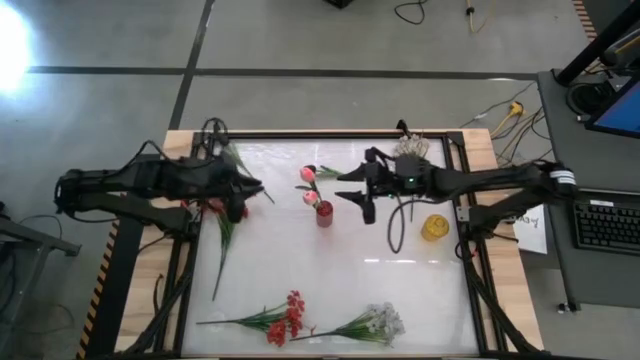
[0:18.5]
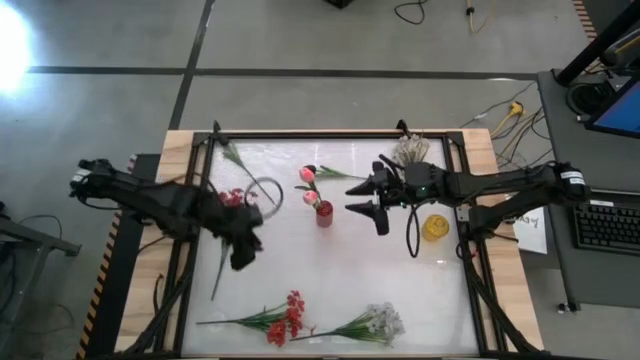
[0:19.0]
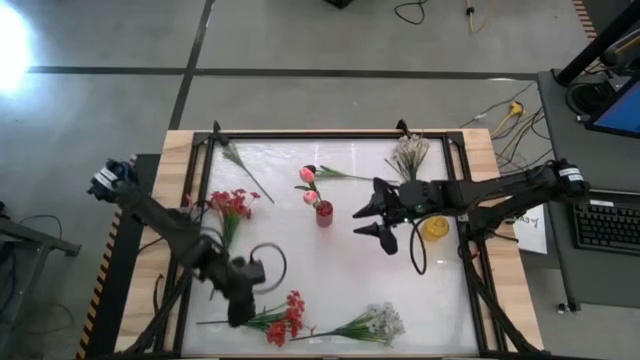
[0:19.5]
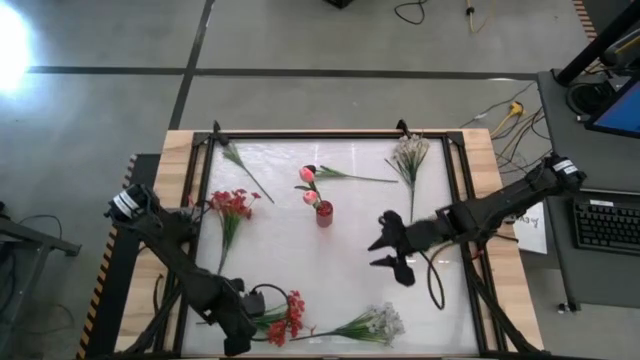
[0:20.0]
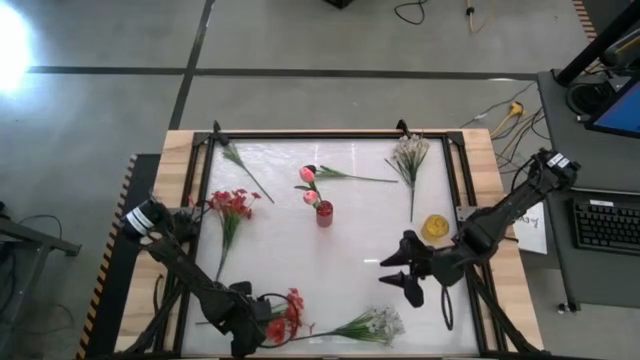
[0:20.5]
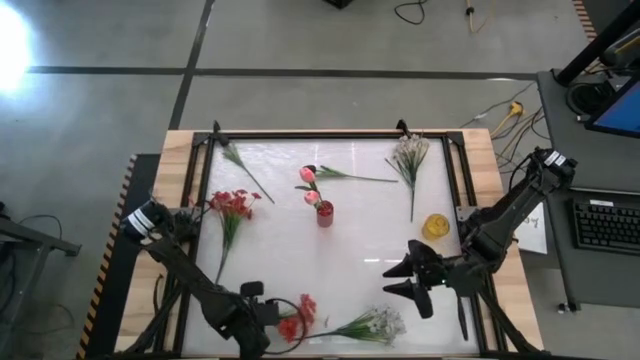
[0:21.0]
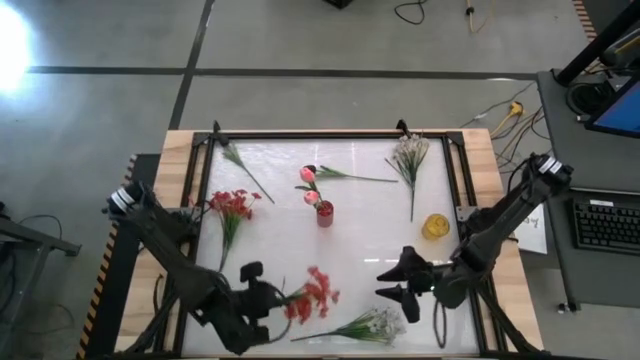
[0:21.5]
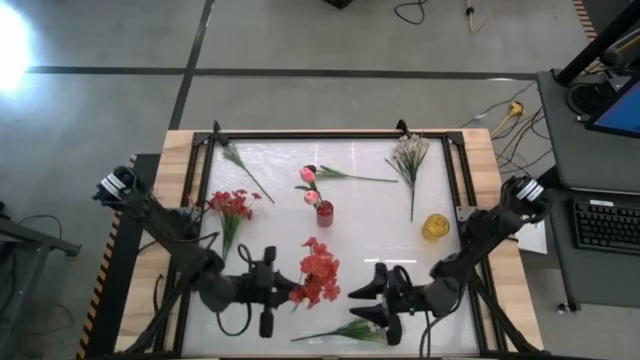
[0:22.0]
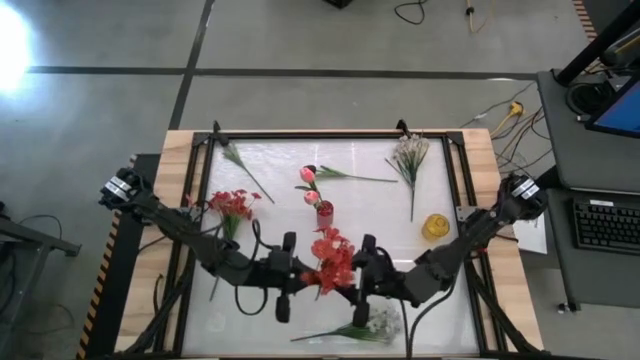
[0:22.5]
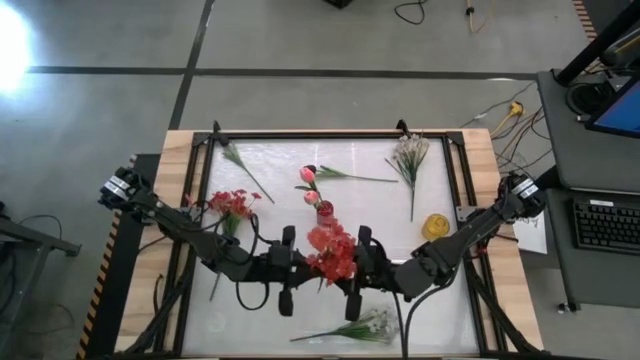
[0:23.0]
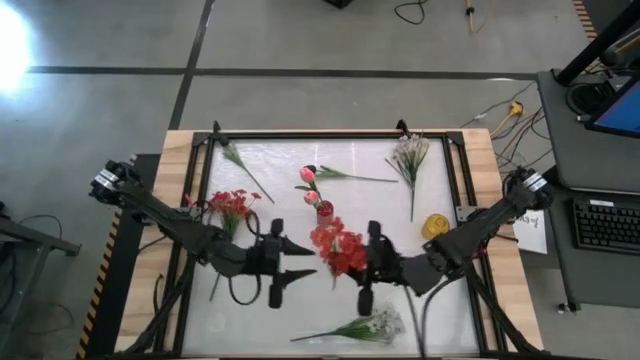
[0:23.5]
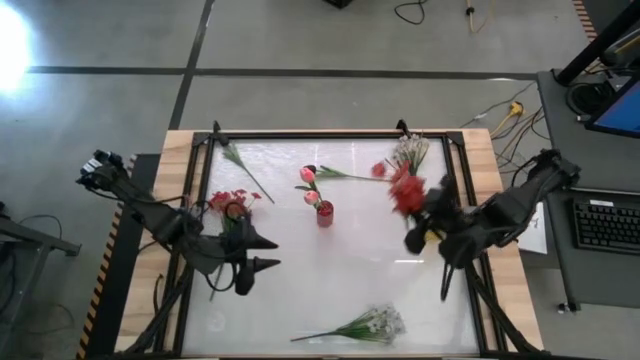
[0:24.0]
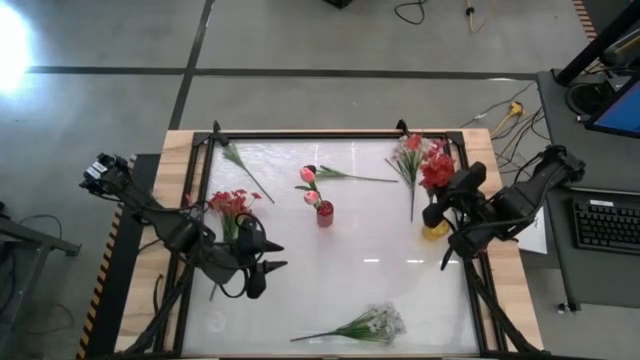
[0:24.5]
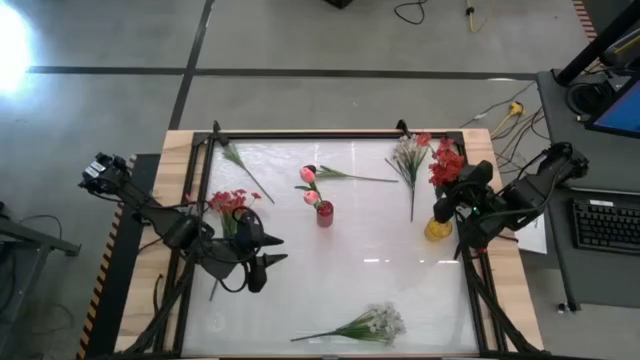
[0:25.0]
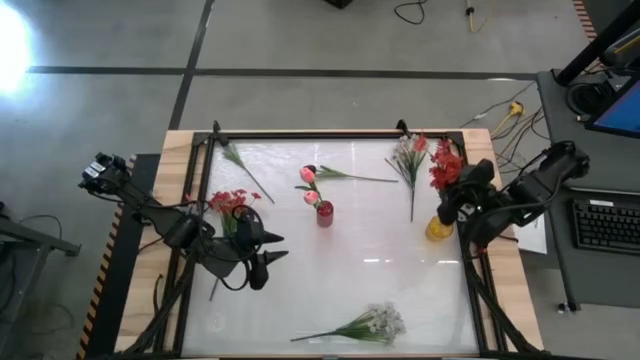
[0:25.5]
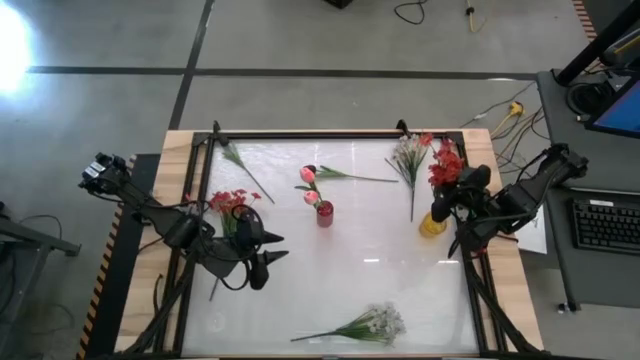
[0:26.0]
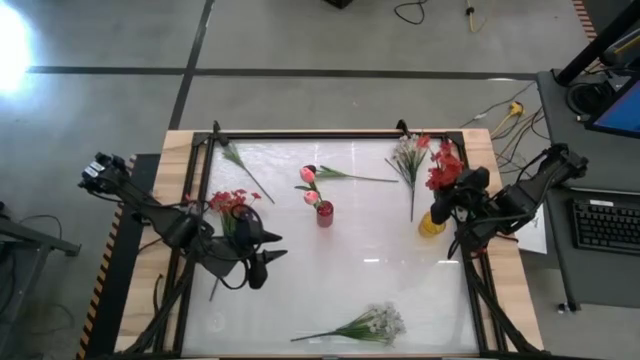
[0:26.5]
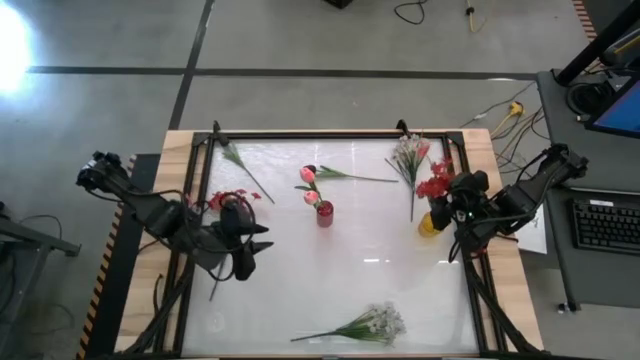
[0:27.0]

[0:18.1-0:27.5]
Task: Sort flowers into vase by color
Put the bottom red flowers into the yellow vase

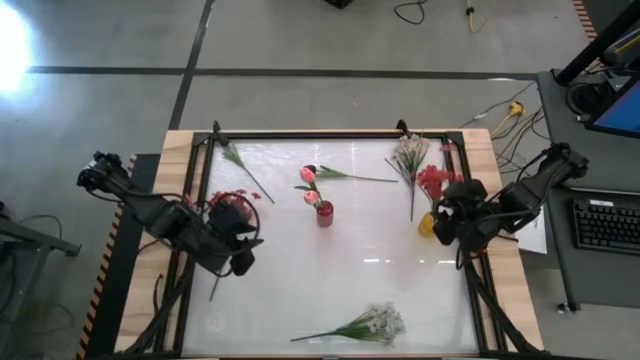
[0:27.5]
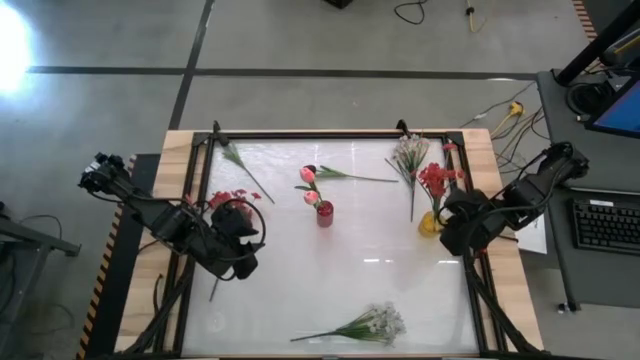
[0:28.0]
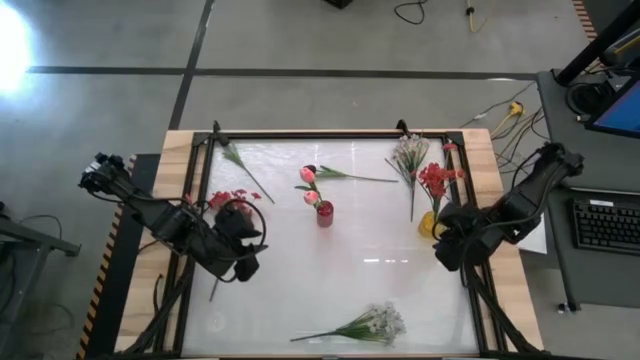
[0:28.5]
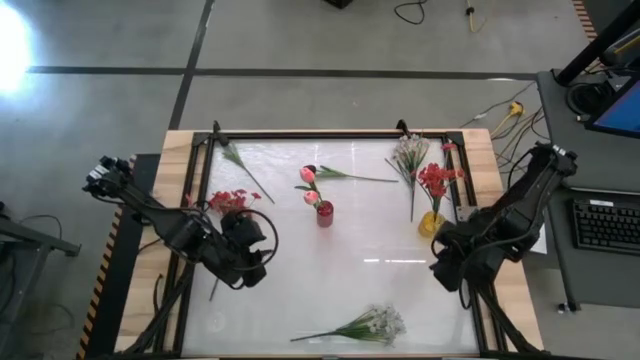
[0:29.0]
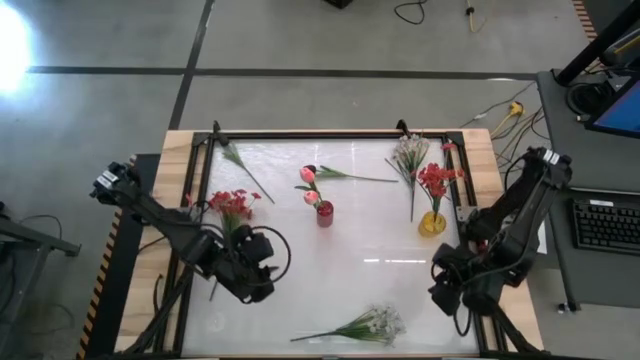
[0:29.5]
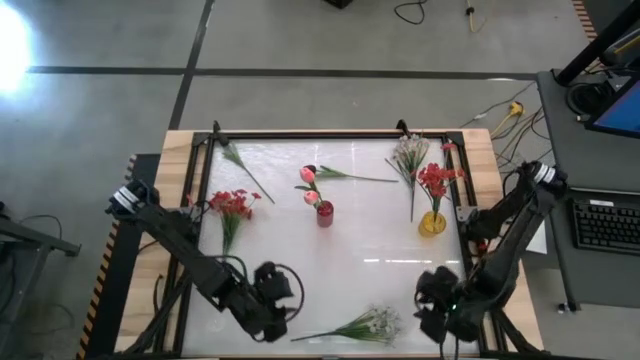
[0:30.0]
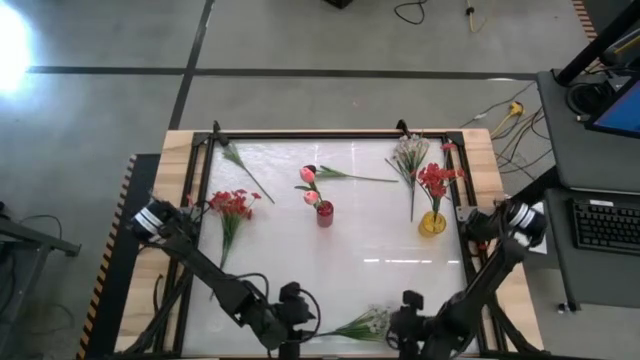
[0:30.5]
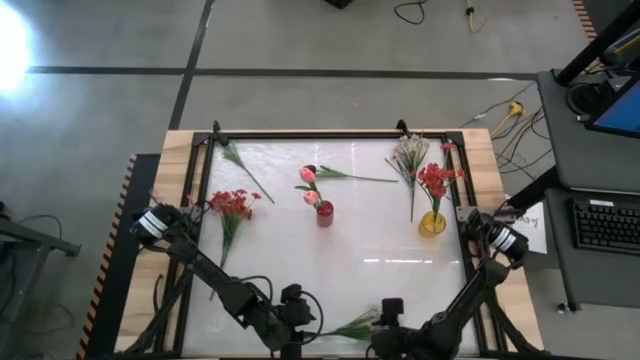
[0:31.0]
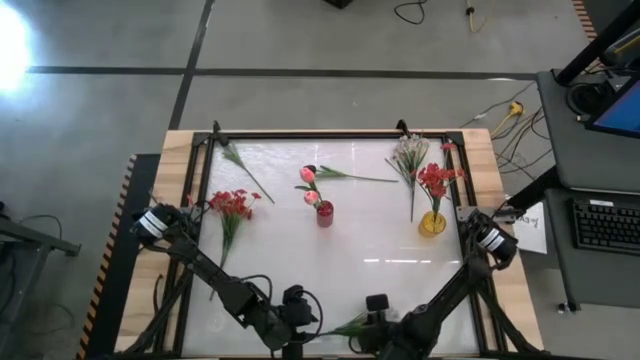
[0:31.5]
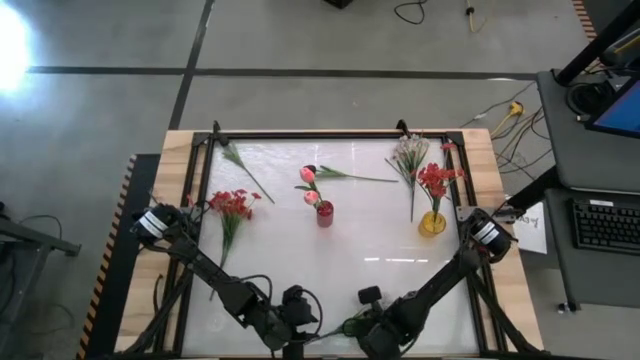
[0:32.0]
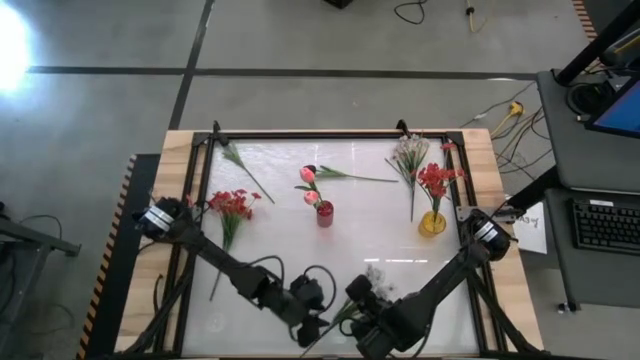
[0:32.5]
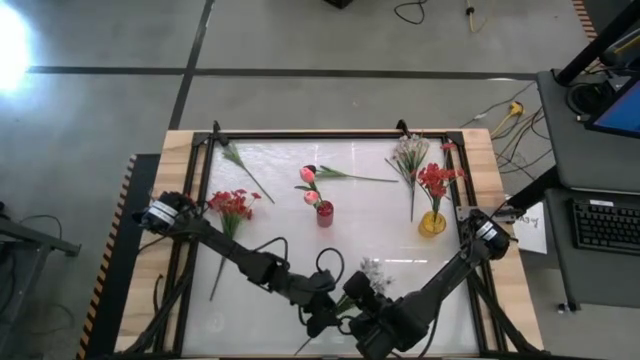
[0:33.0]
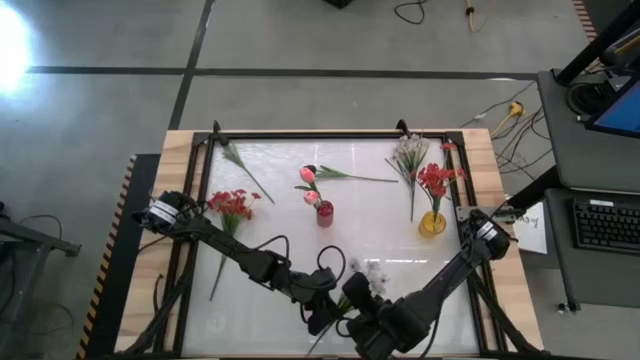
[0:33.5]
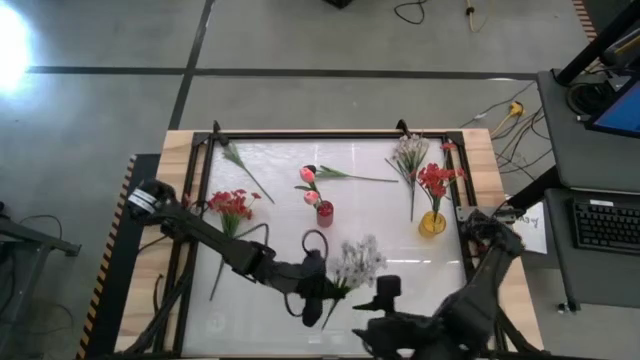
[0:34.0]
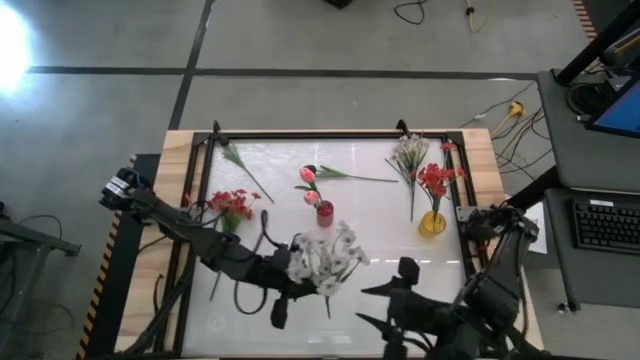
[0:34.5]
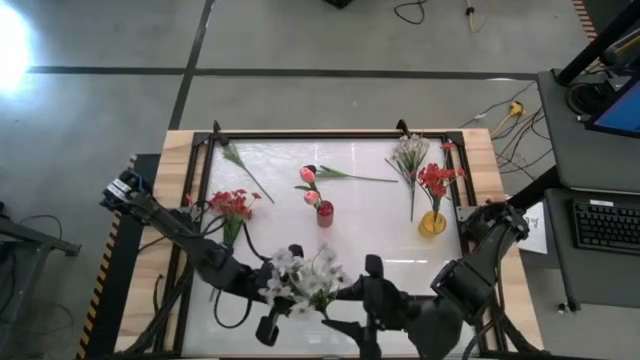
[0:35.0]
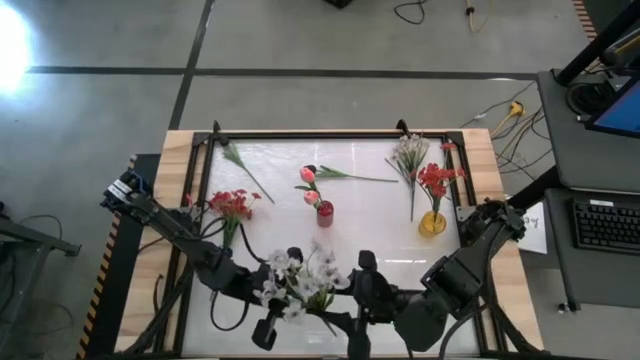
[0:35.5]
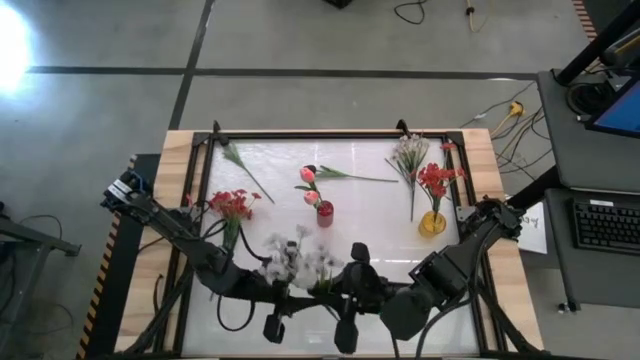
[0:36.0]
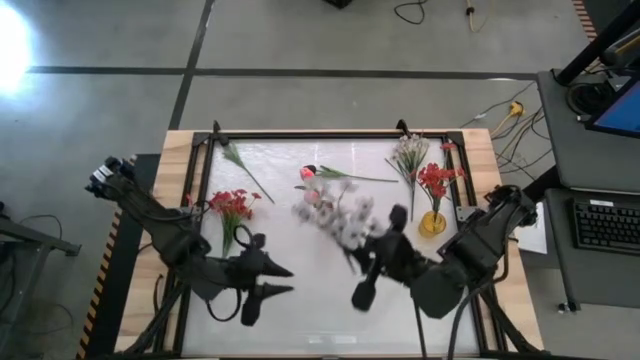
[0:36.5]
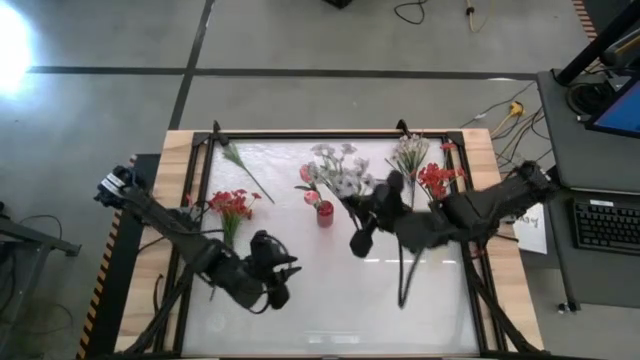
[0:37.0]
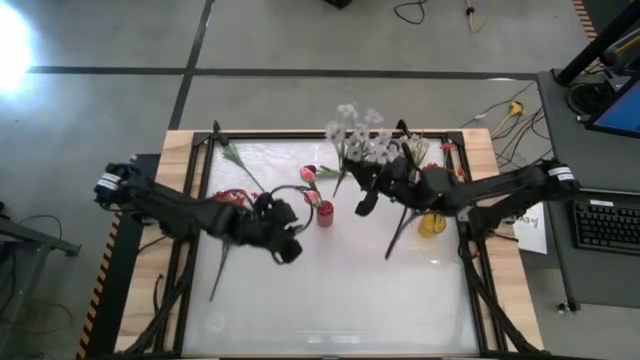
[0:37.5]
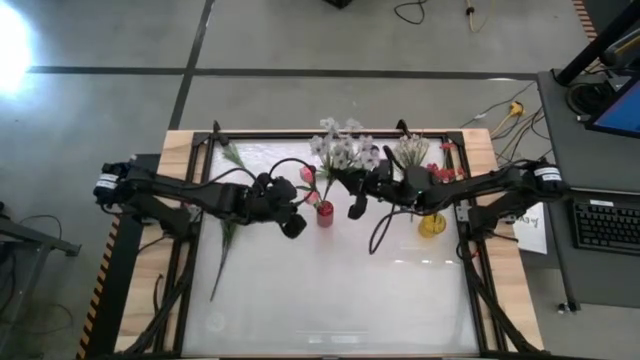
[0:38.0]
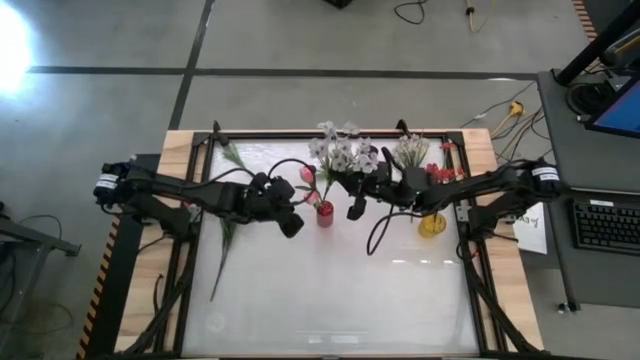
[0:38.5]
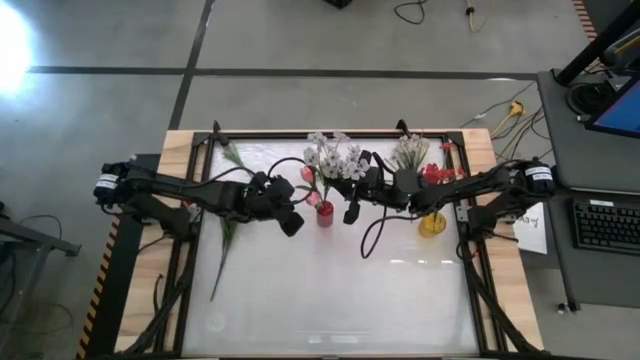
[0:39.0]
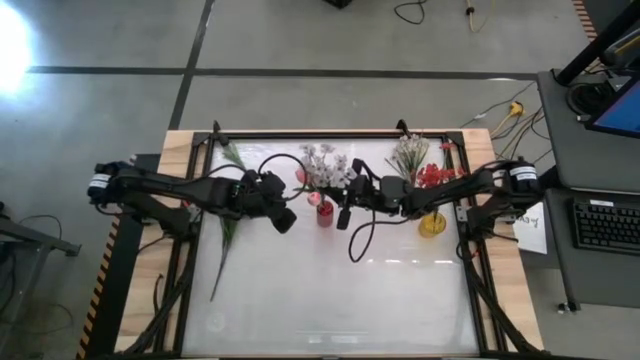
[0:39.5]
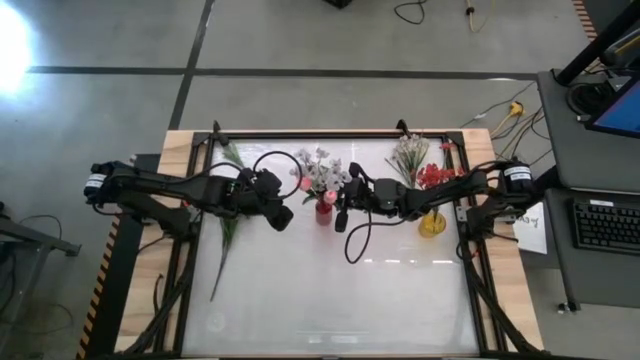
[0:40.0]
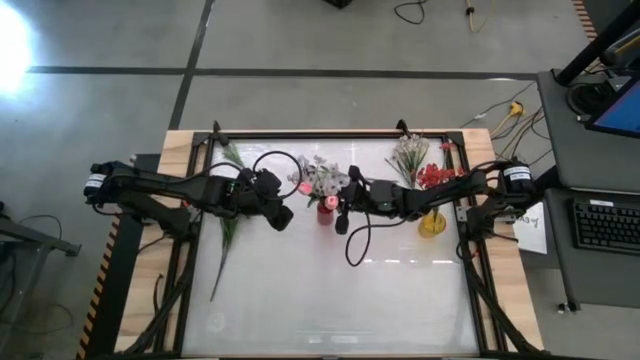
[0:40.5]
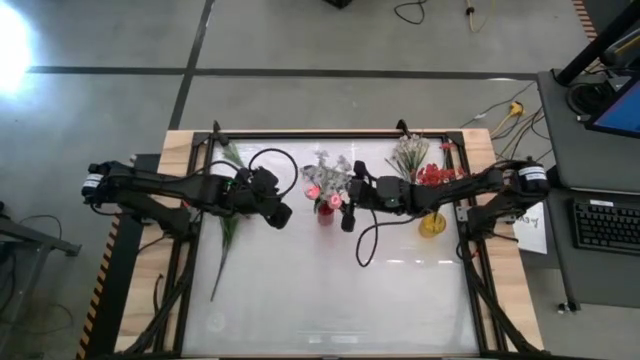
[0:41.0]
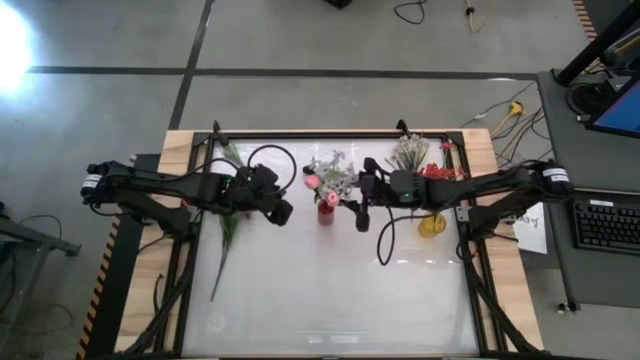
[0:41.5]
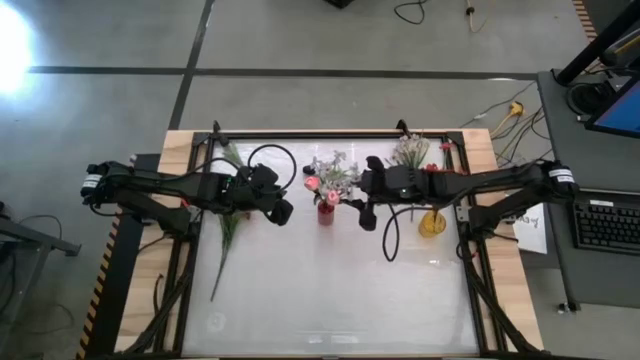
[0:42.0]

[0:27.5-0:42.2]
Put the bottom white flowers into the red vase
